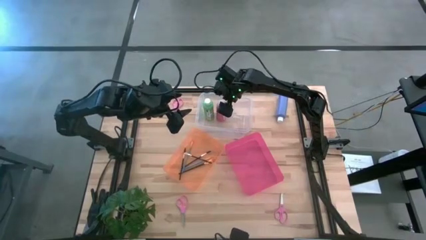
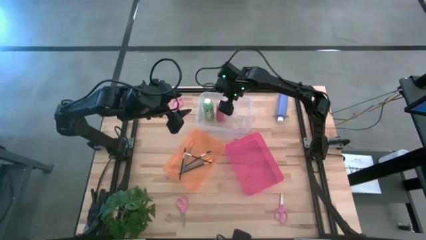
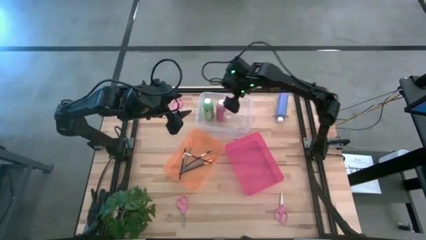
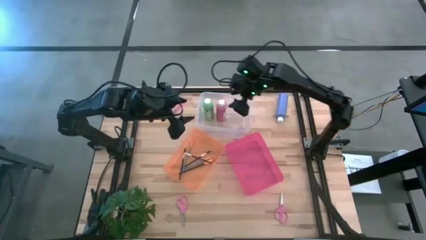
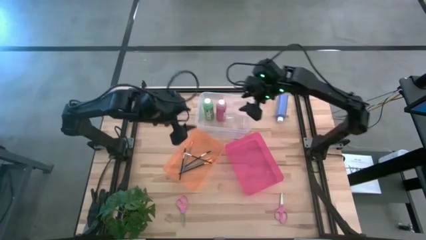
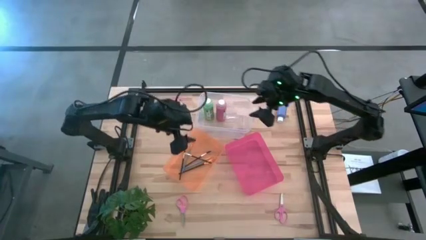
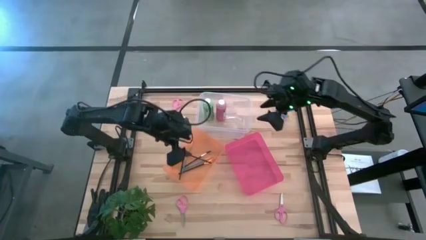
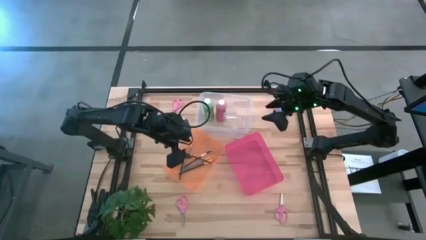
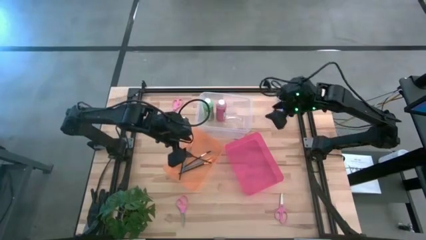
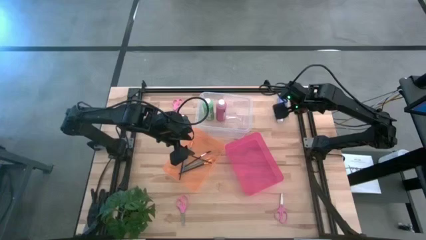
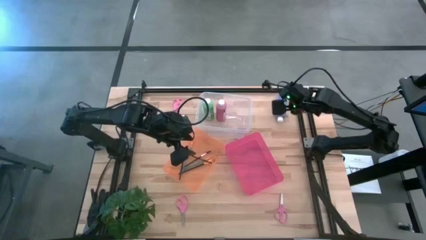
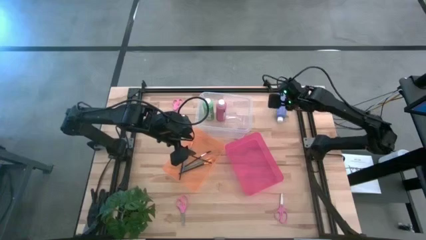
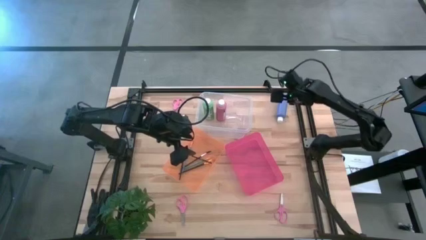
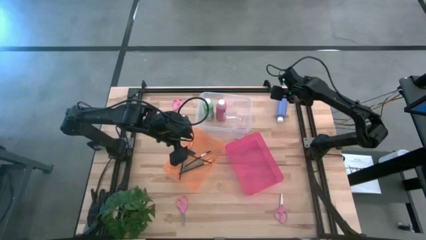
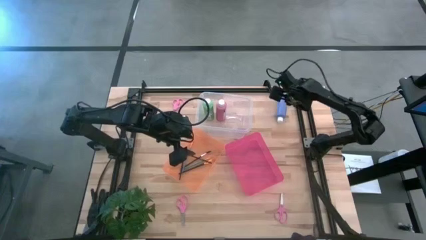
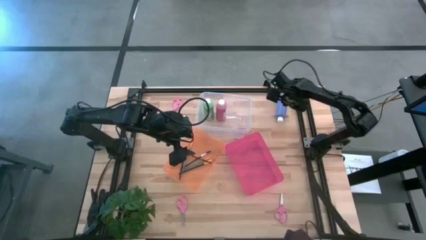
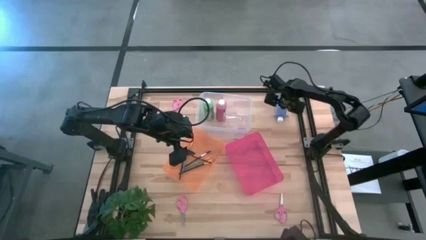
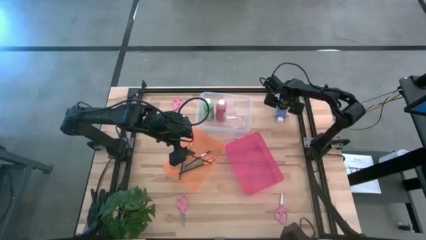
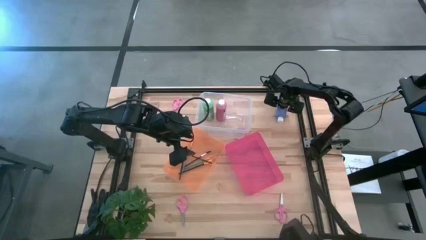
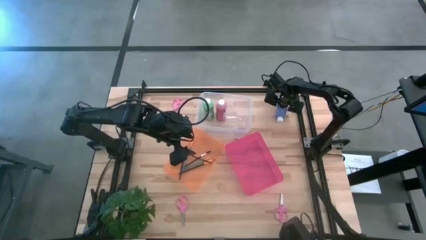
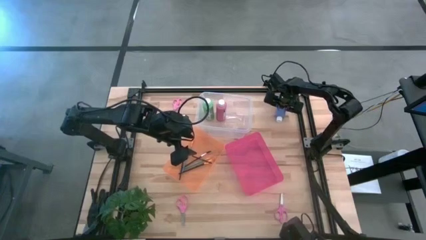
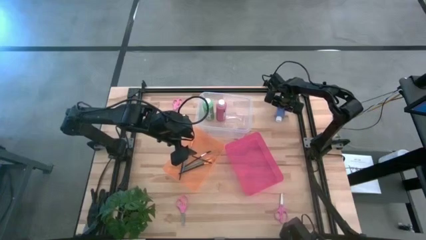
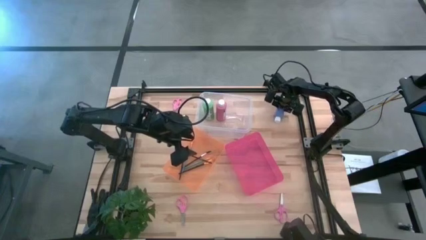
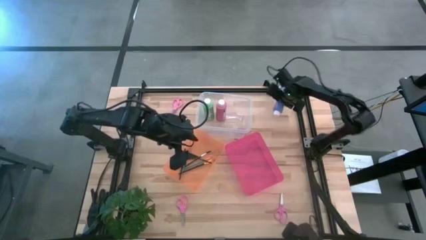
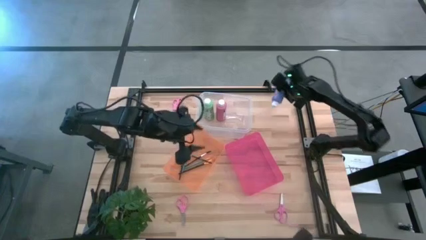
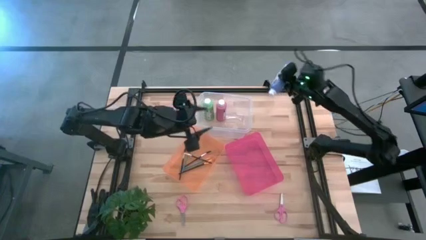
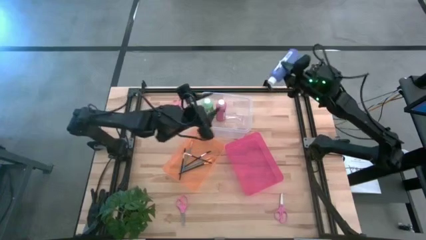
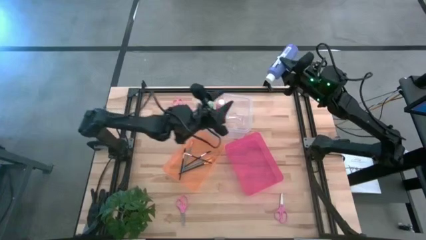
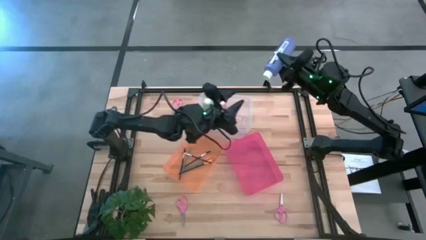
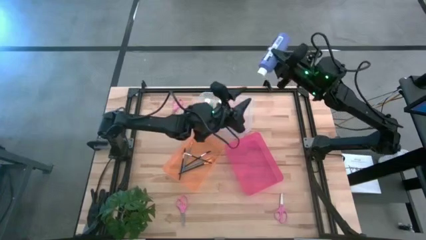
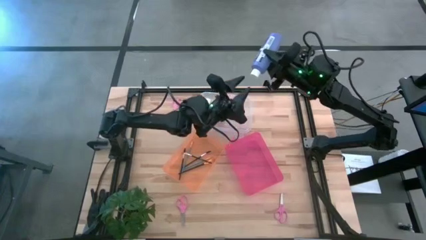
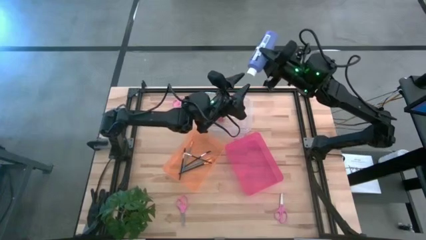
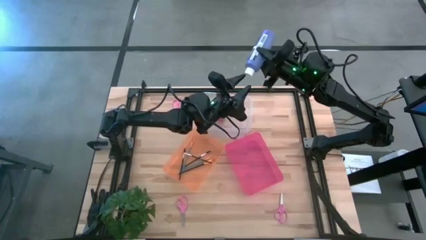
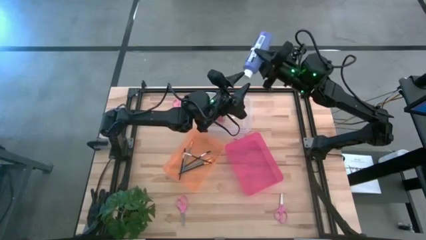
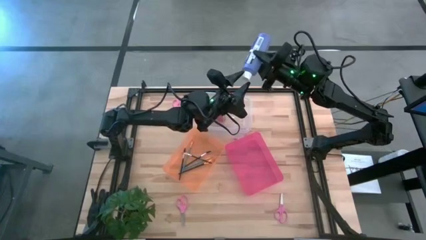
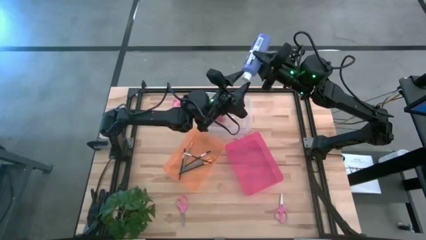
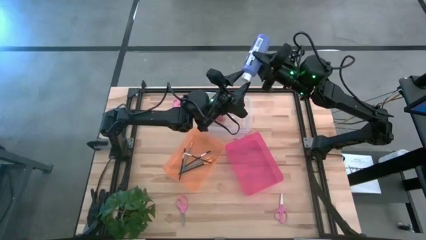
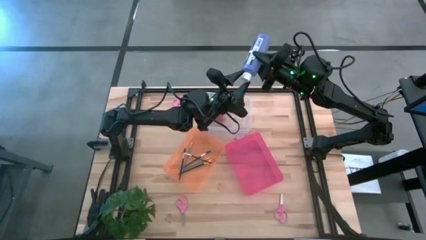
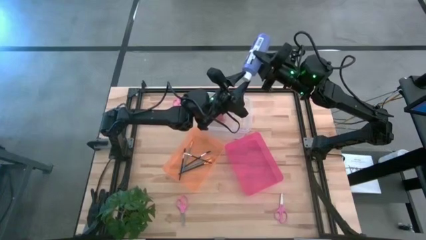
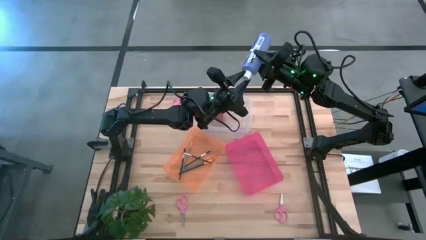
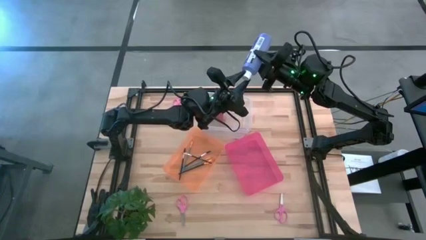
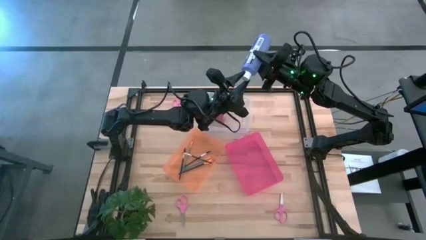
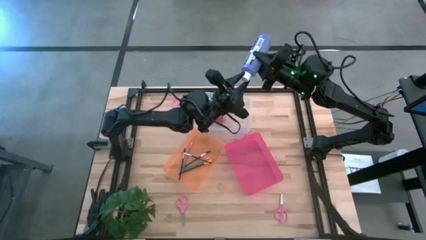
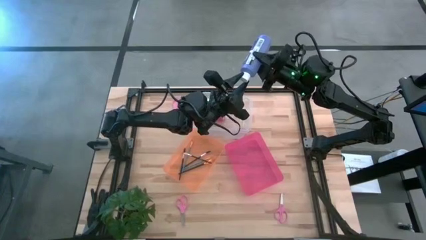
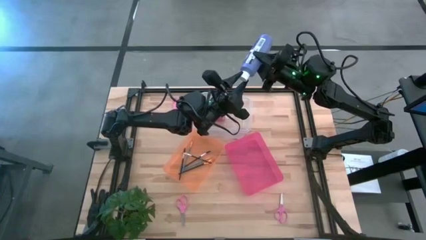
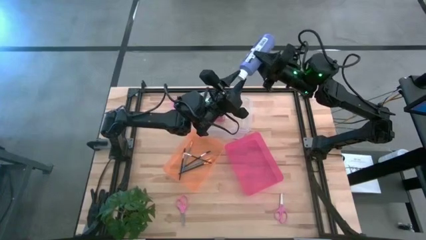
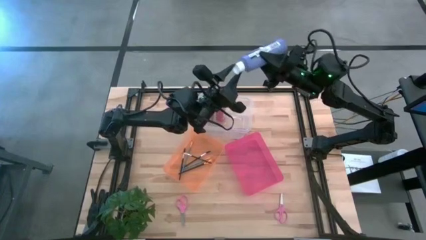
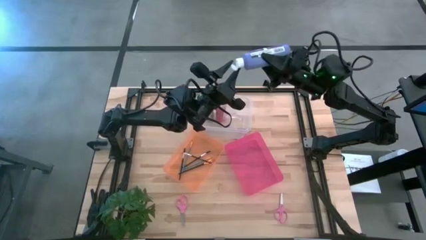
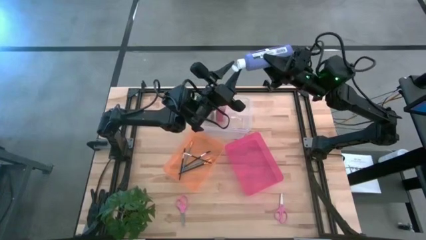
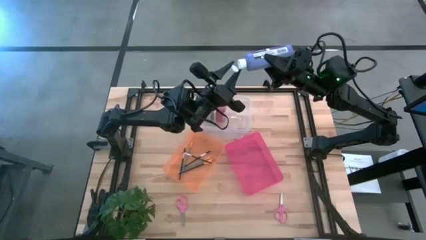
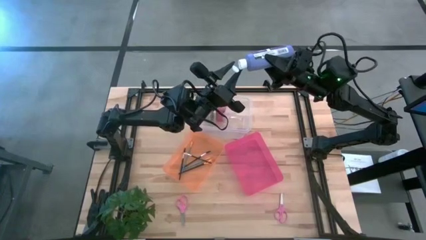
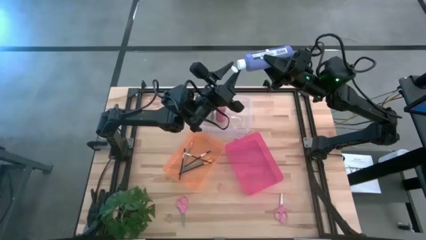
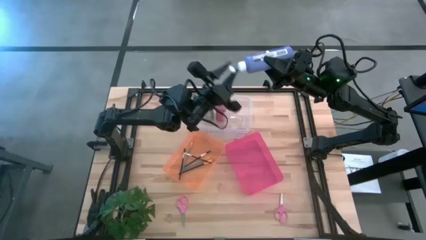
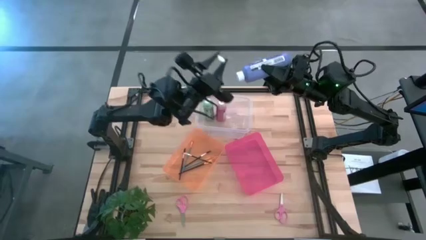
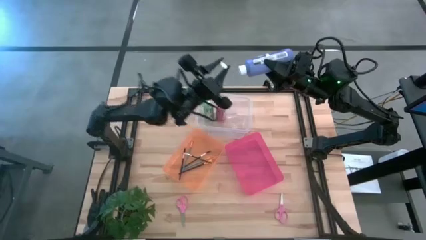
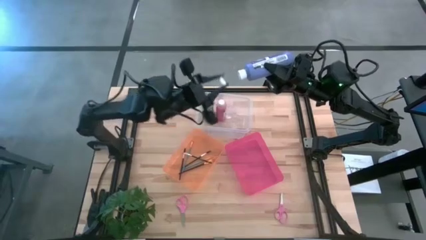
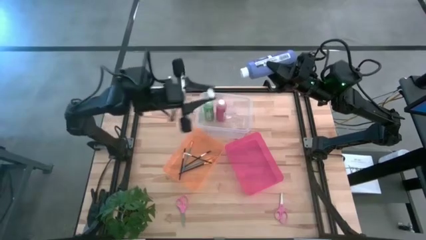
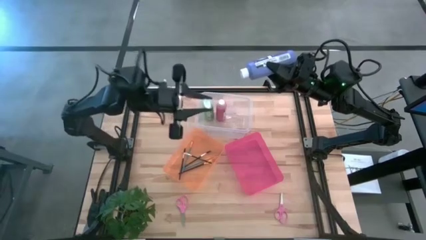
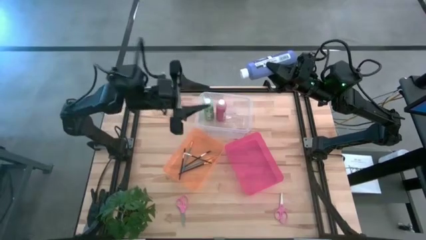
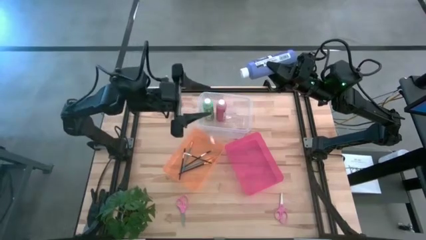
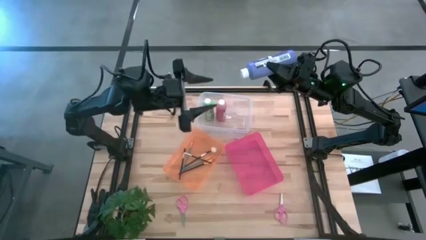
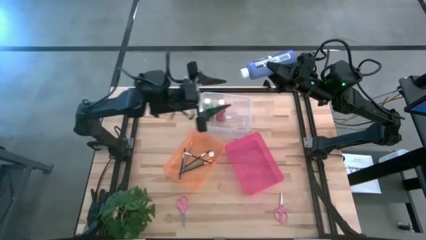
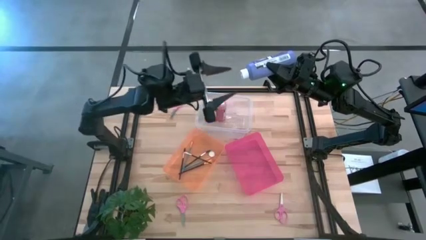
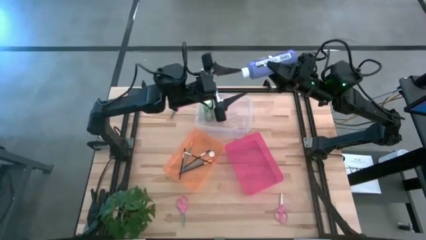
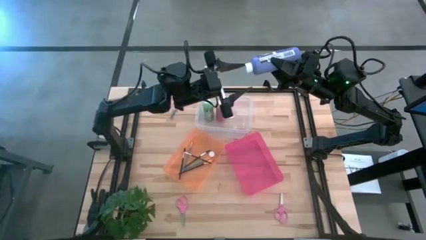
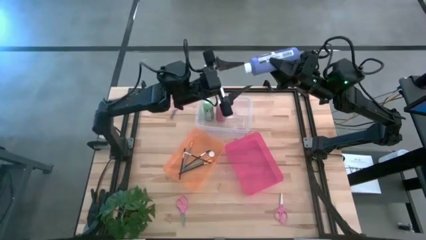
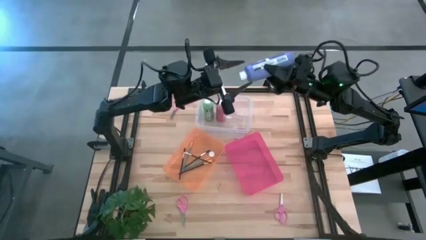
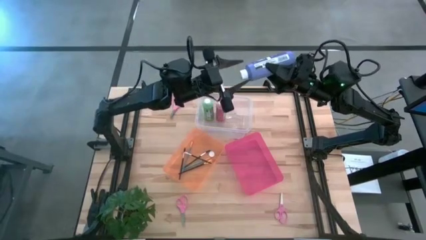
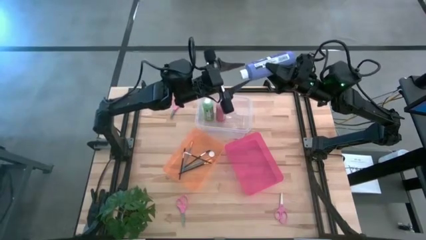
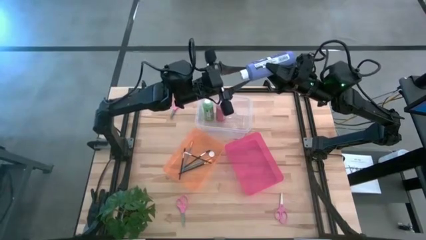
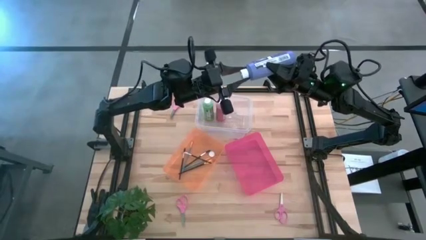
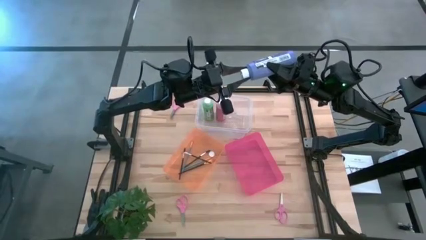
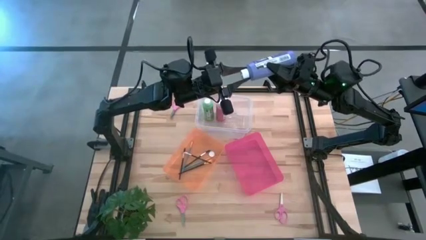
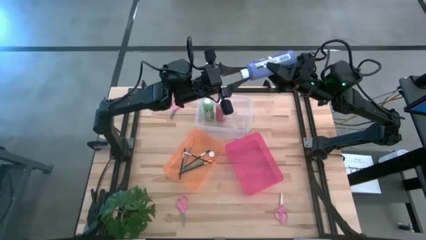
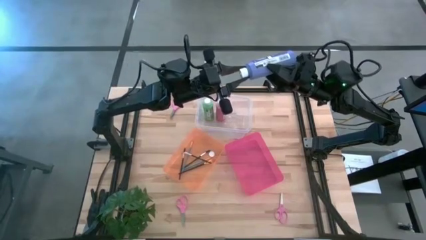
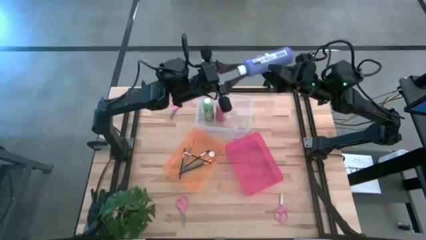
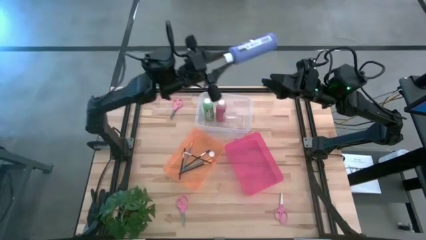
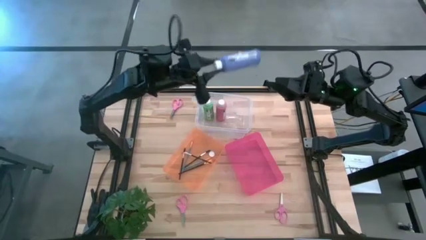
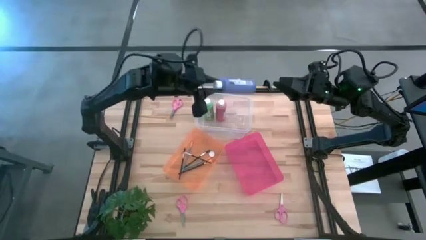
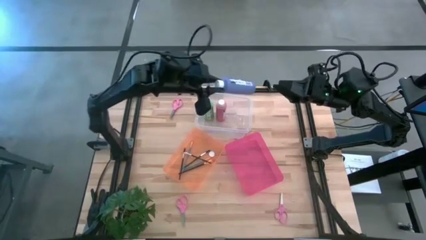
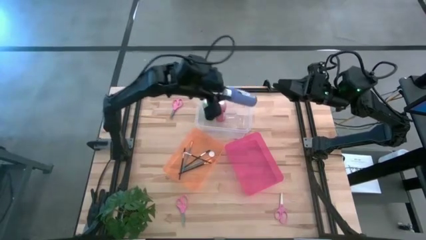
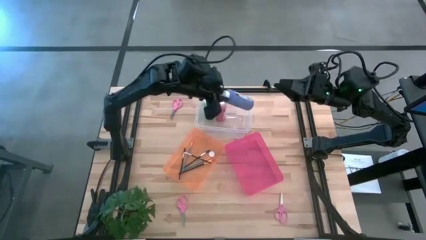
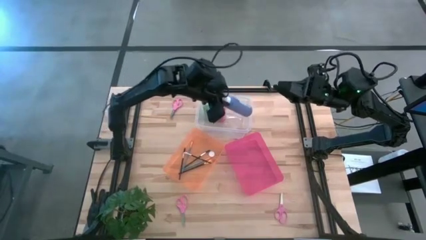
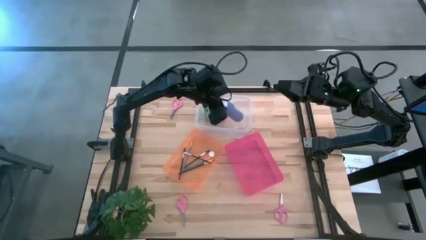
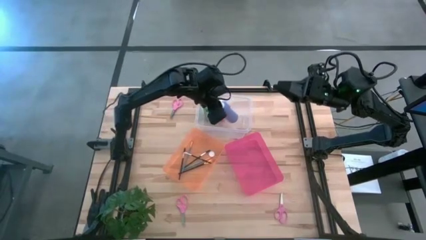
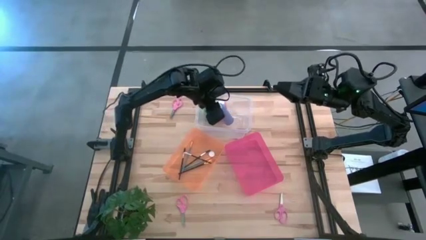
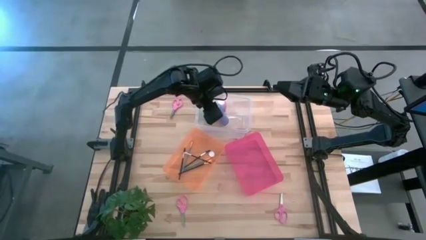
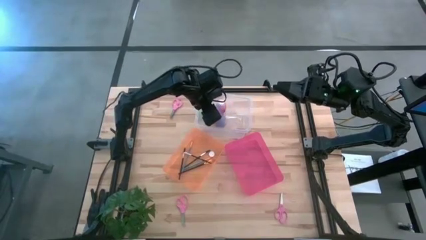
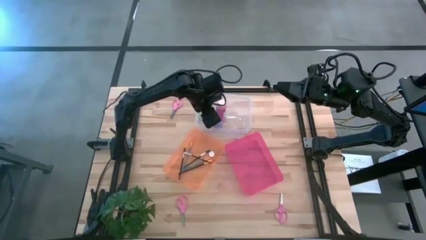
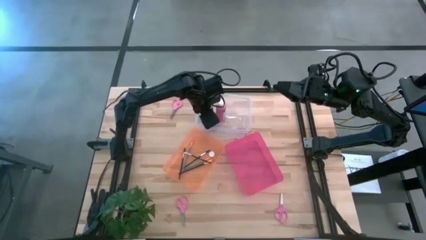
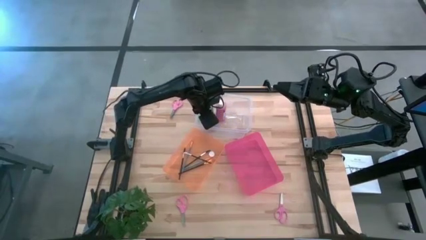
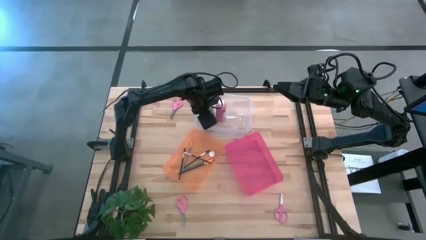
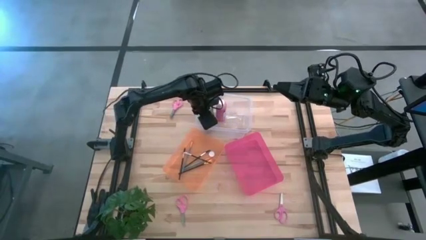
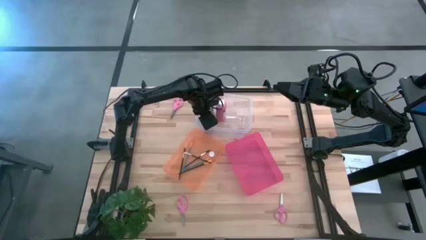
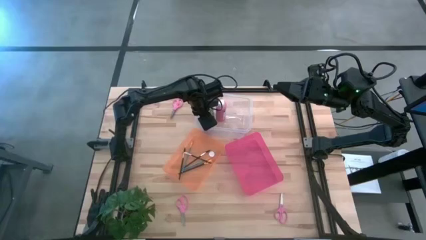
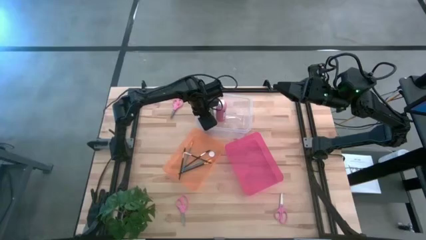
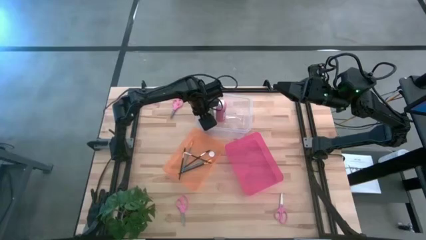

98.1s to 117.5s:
Task: Pick & Place Paint Supplies
Put the blue paint bottle into the transparent bin
